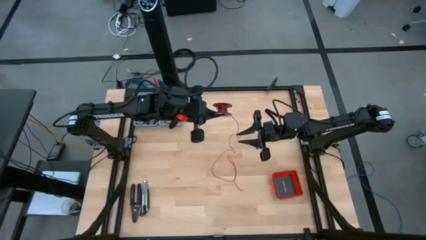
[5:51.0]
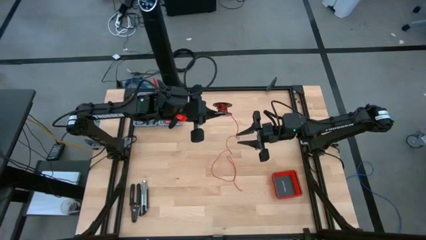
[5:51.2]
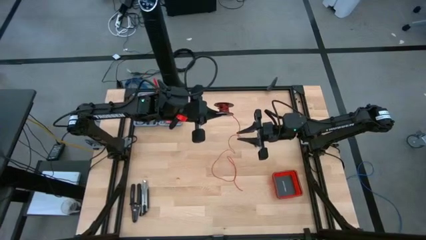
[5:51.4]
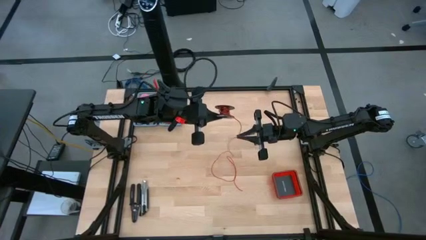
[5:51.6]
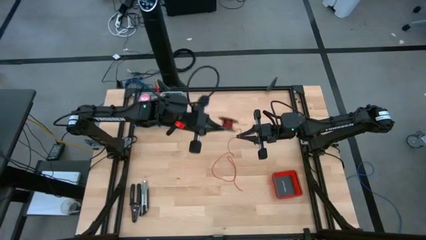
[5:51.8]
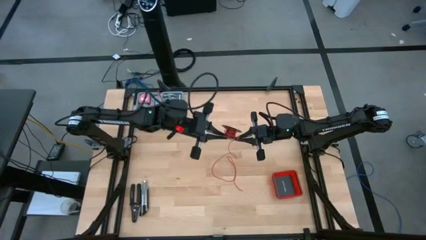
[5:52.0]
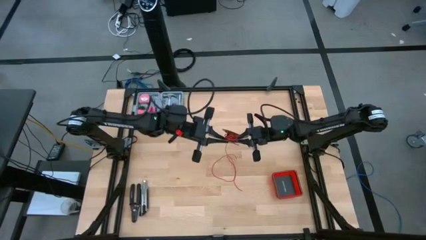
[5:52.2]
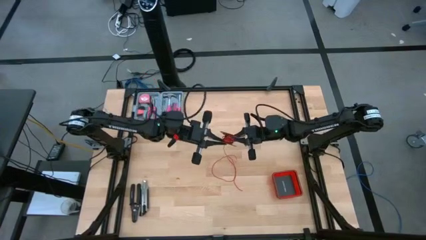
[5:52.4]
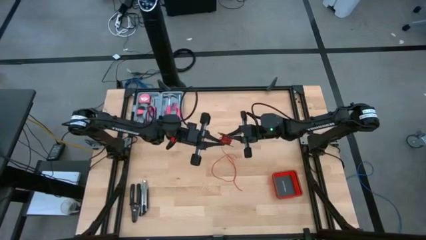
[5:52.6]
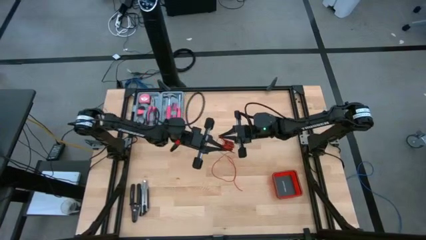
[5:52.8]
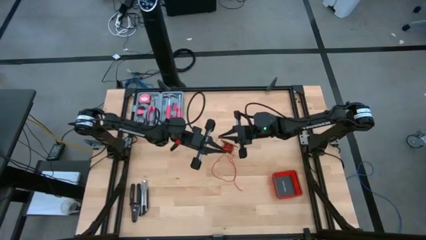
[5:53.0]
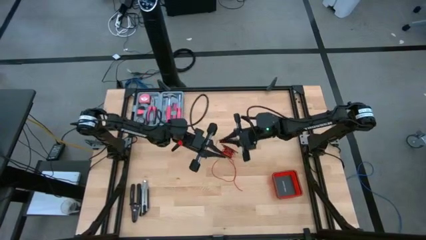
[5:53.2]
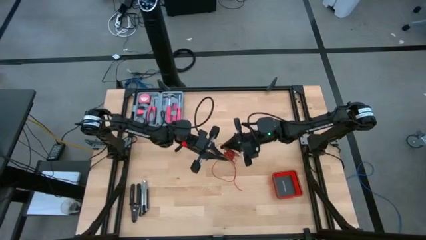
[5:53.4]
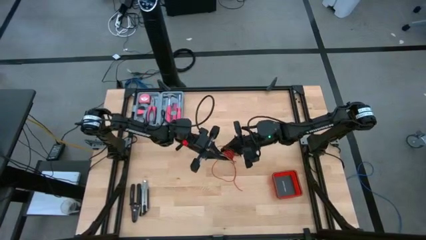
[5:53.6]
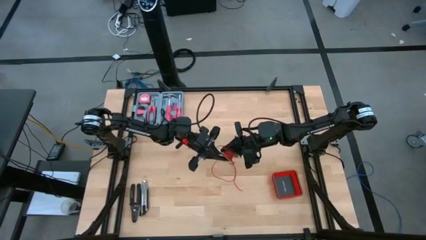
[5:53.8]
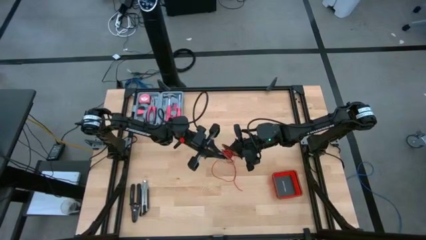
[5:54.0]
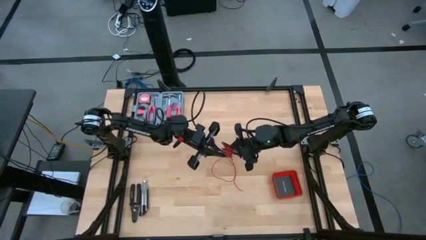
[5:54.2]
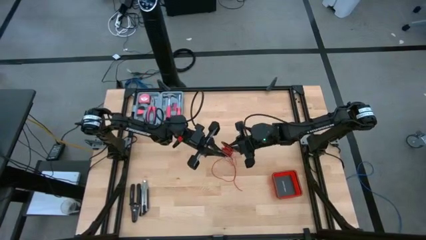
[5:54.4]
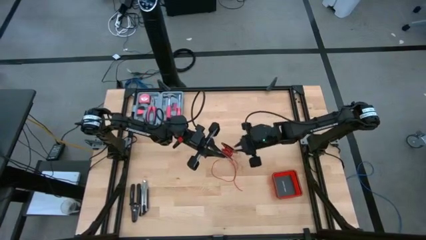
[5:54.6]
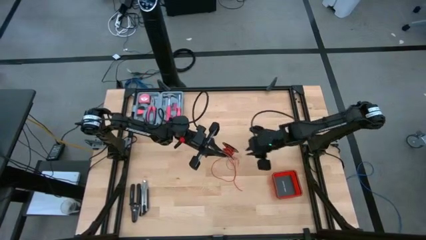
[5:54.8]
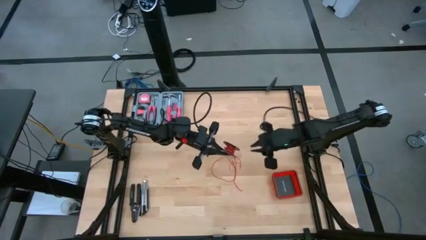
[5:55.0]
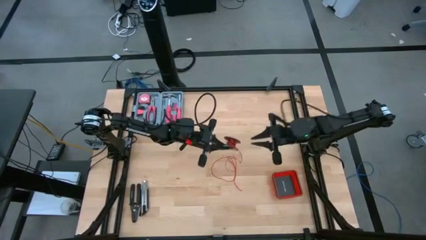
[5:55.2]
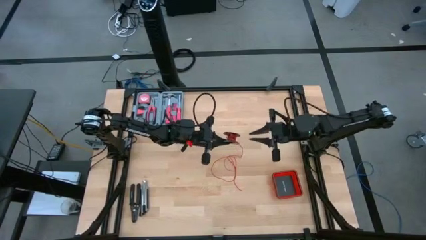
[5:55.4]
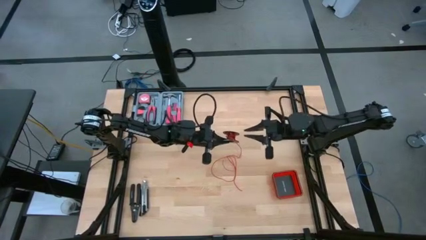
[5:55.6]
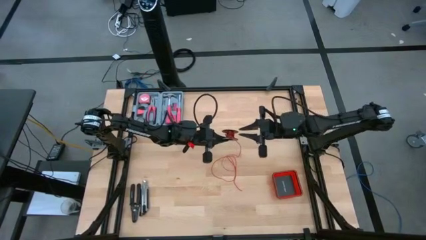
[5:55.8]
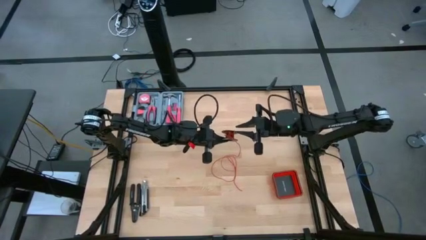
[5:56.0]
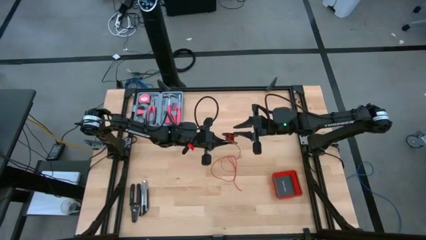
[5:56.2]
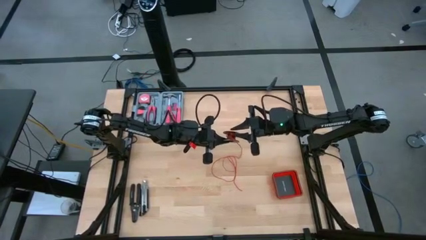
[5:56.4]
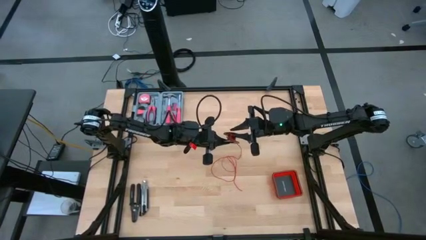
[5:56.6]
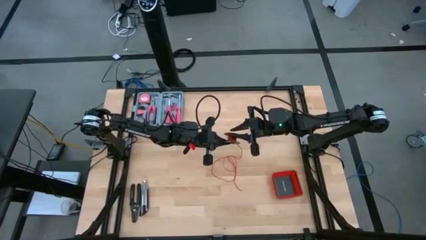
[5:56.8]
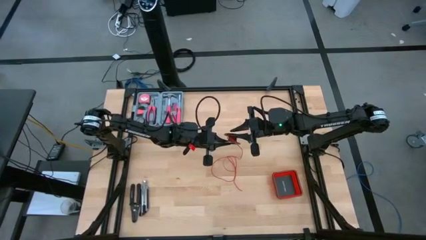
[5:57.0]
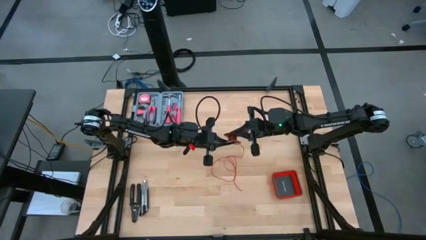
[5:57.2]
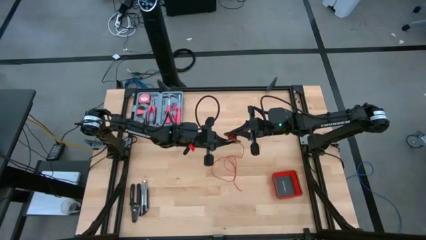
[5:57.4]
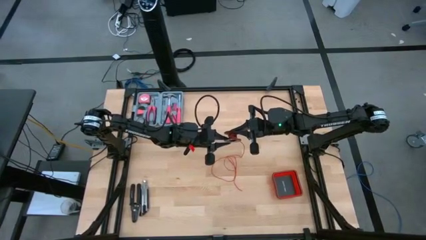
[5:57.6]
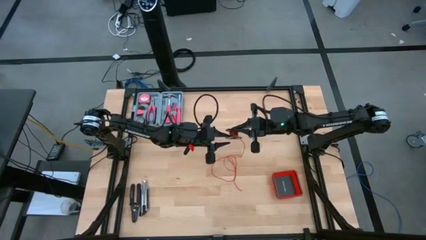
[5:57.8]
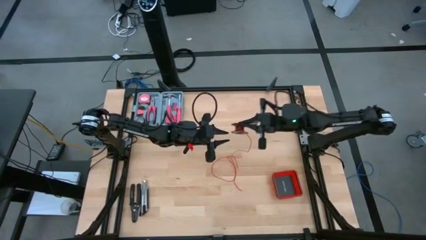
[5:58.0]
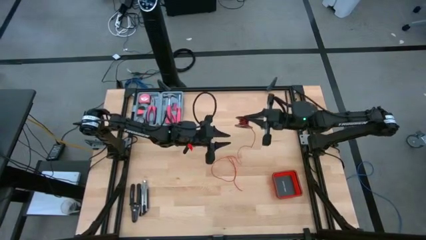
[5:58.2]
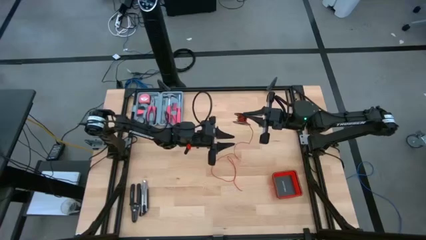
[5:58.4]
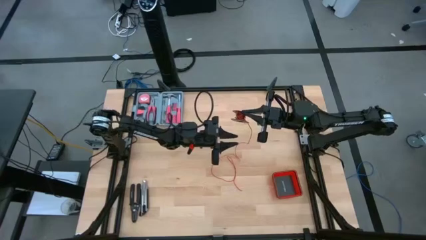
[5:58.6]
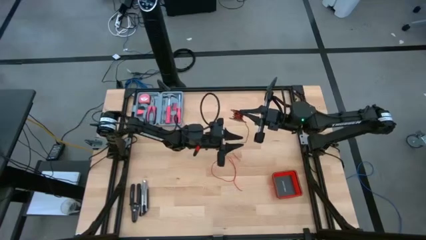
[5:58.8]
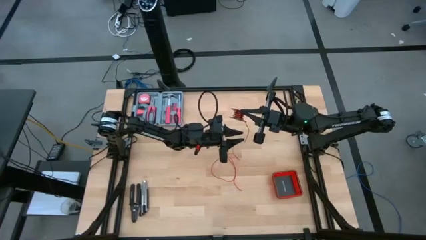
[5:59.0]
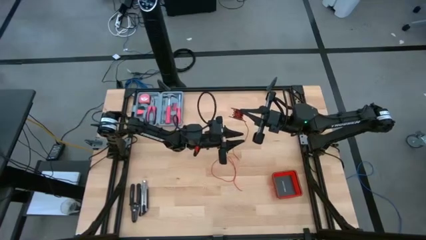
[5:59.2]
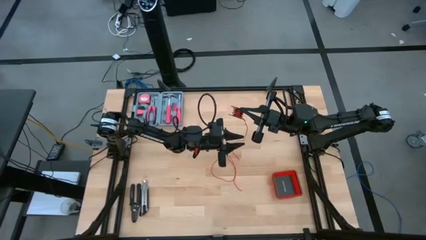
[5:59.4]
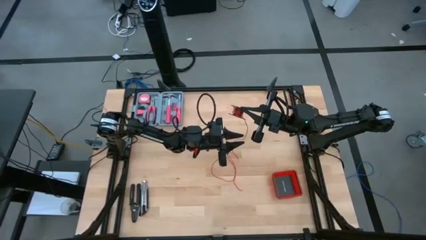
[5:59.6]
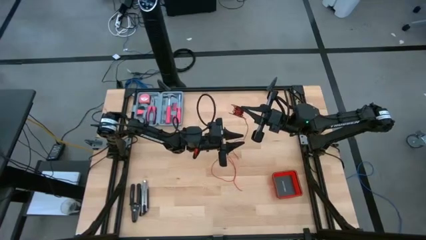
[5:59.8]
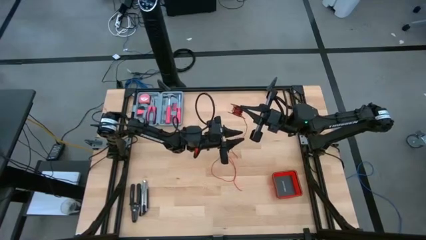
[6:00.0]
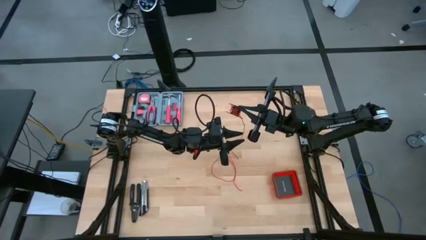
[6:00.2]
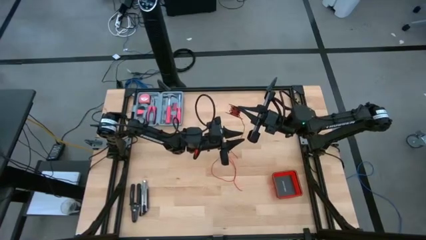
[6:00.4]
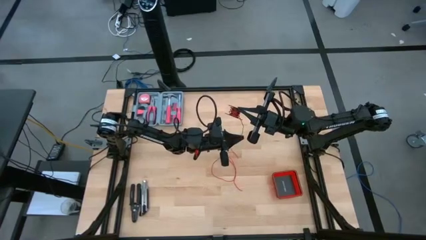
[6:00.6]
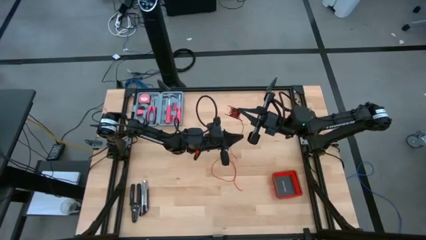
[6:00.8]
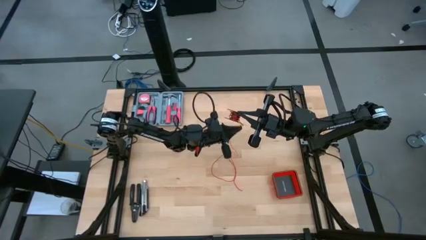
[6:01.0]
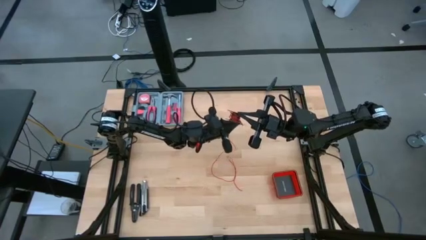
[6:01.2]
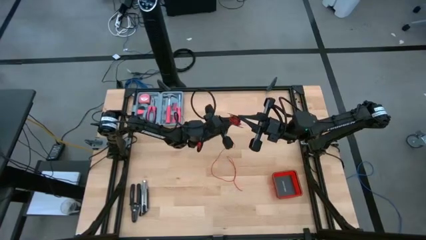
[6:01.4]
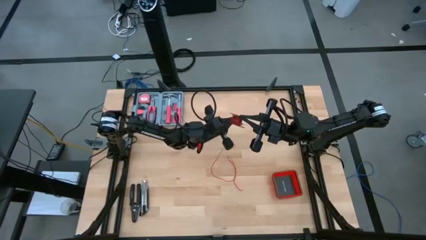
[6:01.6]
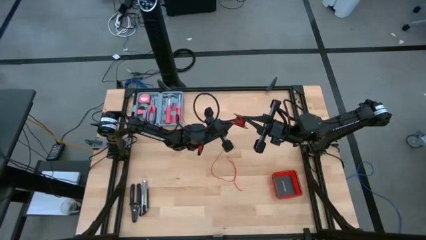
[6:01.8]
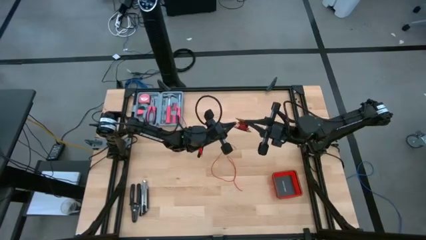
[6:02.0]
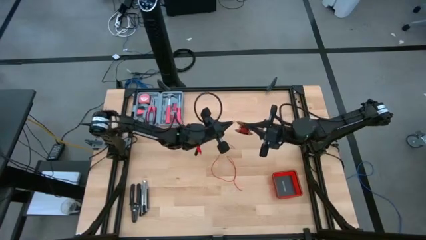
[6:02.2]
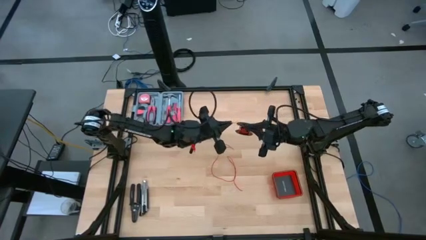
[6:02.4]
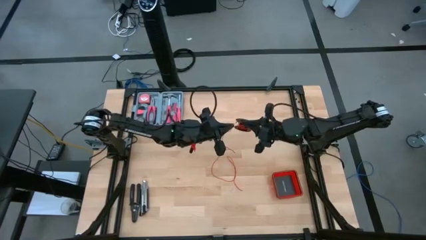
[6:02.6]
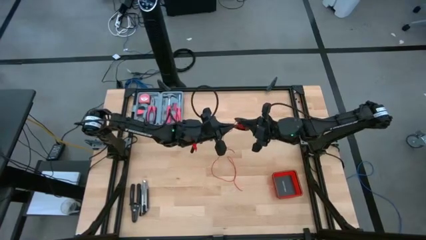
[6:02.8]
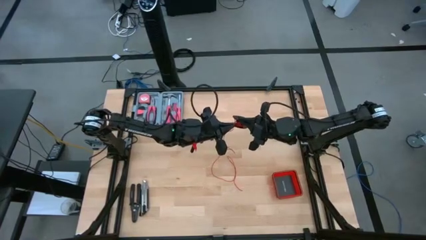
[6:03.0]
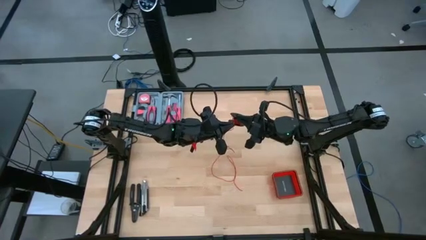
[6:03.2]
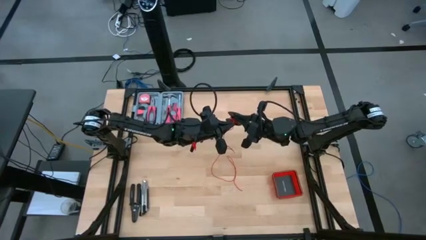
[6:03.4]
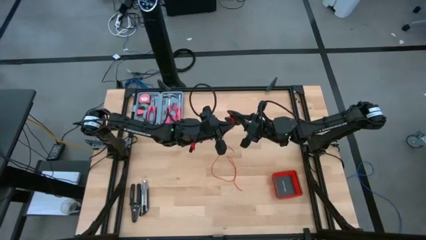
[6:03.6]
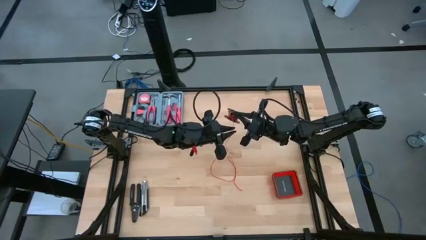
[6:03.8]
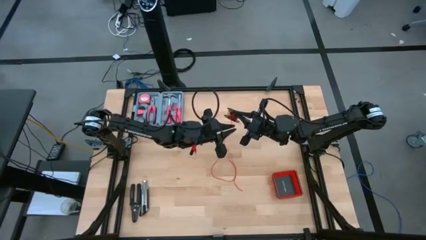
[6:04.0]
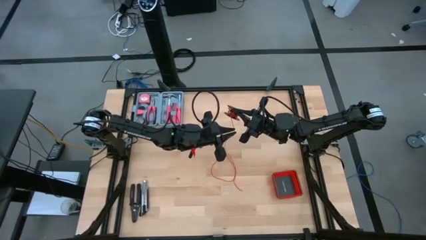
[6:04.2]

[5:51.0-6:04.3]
Task: Coil cords
Coil the red wire onto the spool

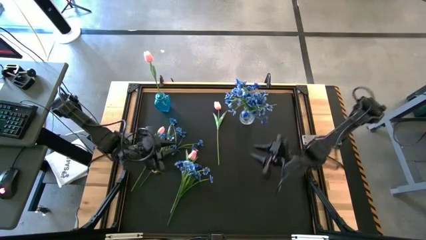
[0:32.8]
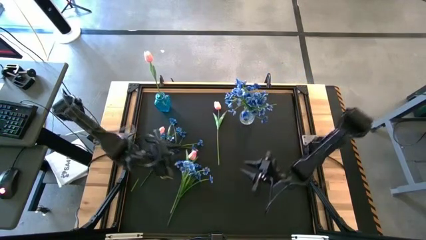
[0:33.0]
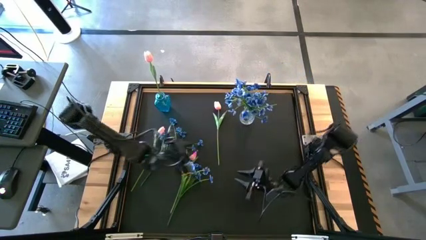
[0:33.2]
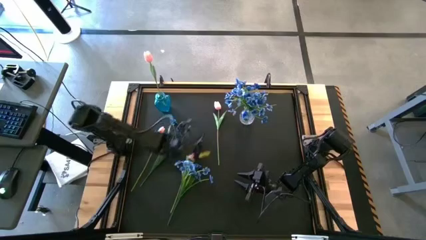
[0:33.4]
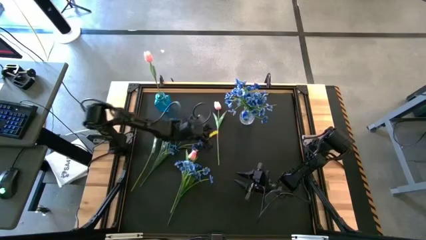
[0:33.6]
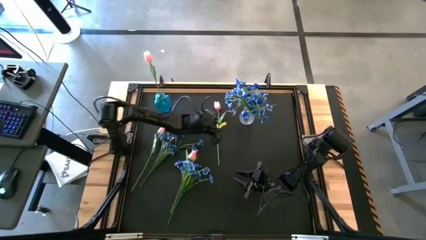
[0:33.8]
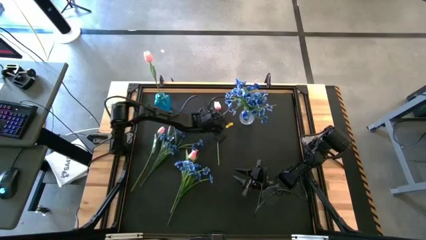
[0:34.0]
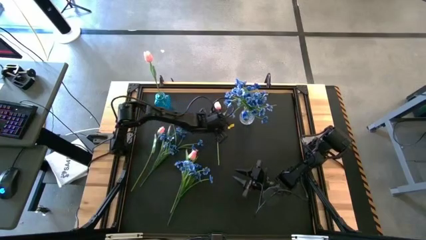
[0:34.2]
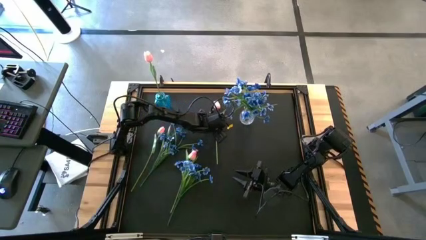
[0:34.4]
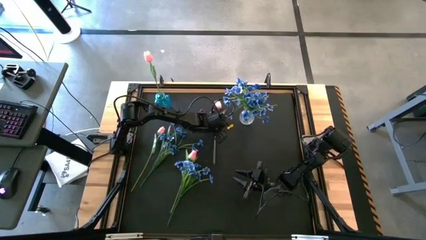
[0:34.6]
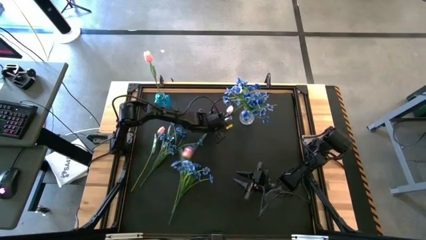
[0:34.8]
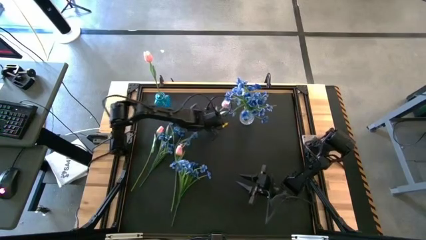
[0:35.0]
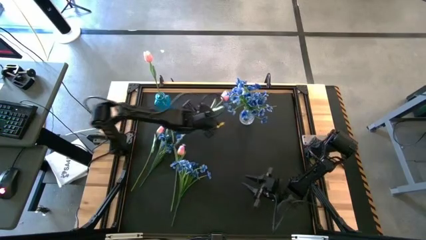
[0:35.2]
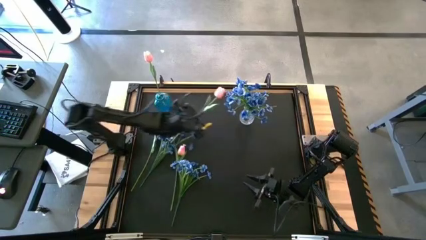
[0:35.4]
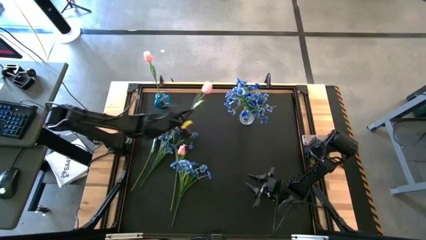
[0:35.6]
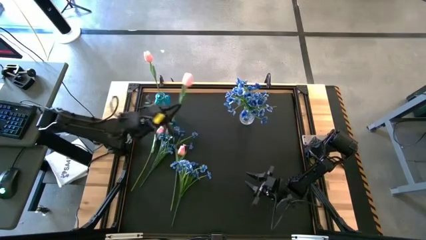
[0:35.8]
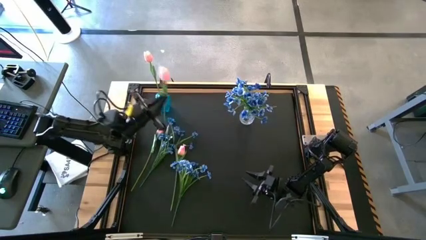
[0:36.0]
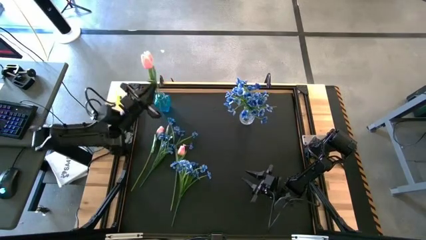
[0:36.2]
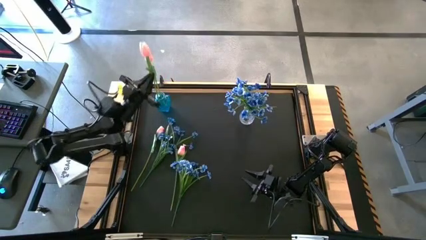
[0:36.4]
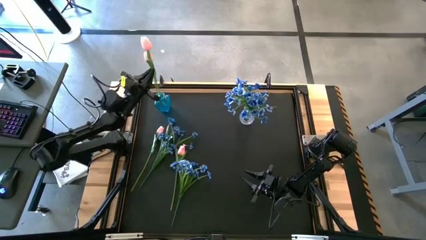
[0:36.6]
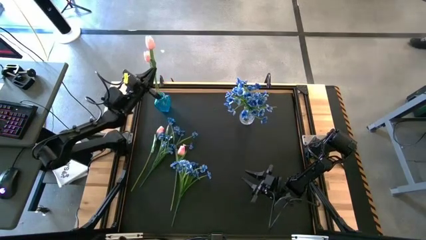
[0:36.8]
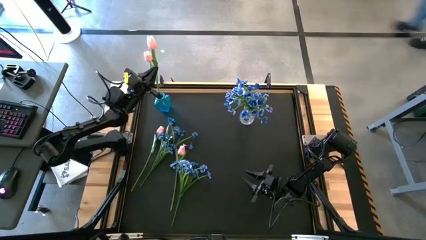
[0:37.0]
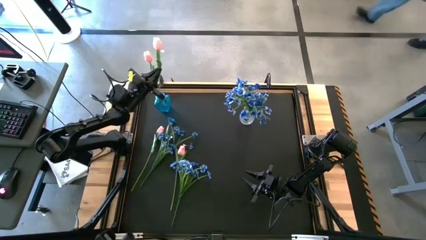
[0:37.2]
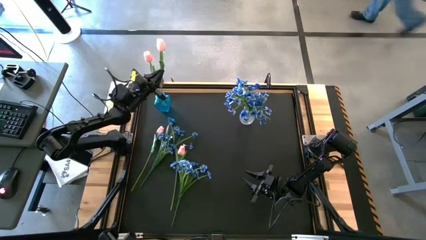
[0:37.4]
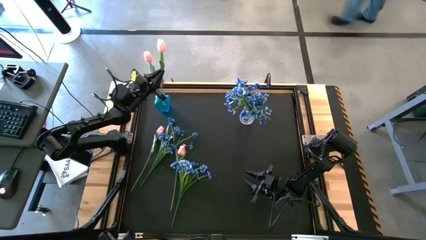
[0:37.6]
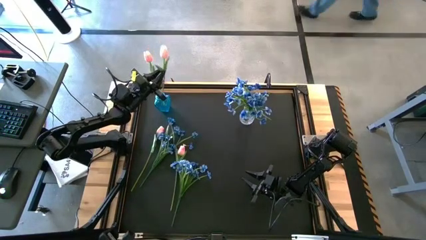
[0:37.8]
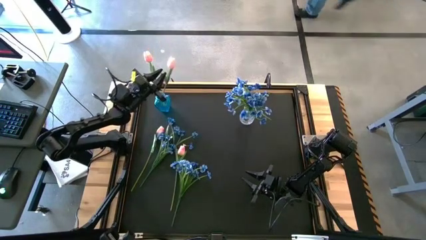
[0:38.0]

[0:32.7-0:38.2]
Task: Sort flowers into vase by color
Put the pink flower into the blue vase
